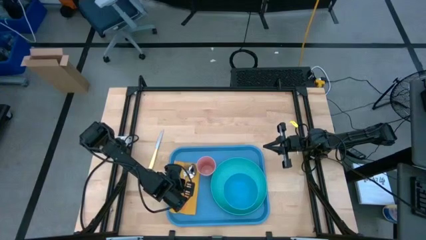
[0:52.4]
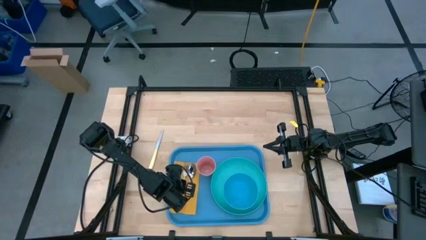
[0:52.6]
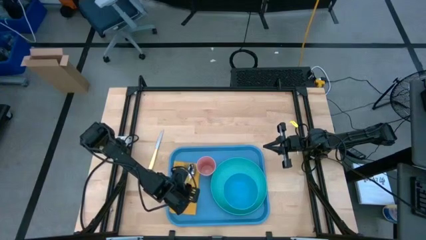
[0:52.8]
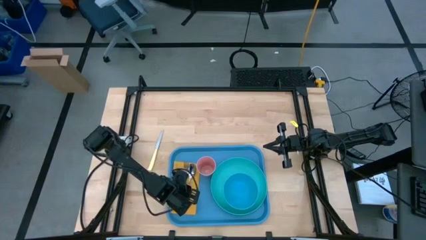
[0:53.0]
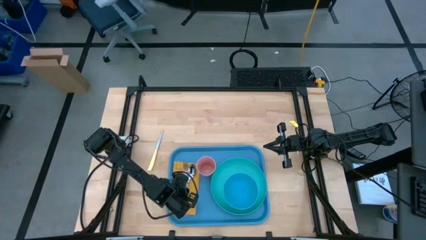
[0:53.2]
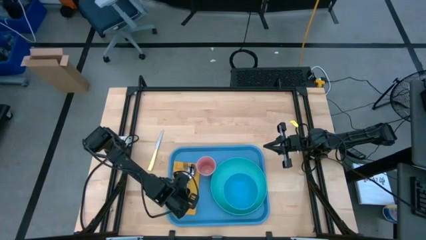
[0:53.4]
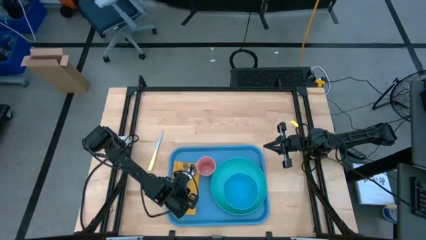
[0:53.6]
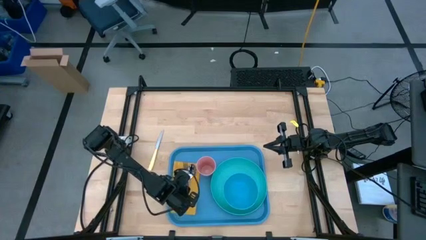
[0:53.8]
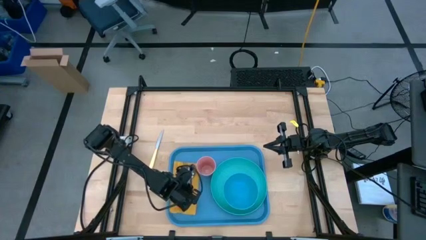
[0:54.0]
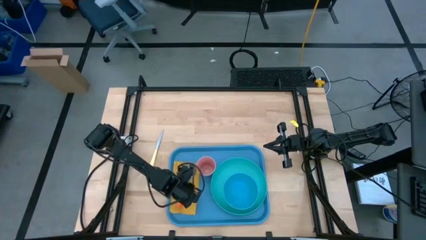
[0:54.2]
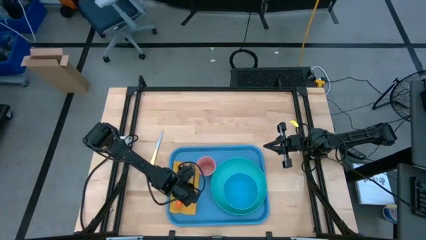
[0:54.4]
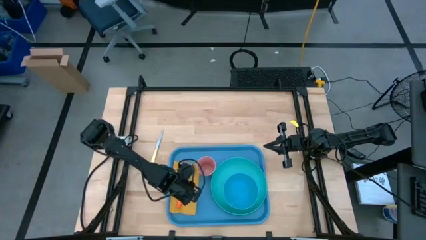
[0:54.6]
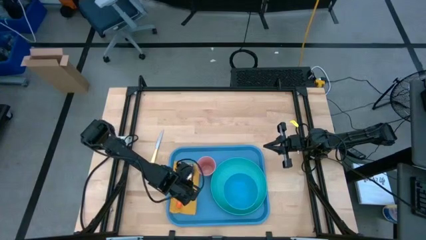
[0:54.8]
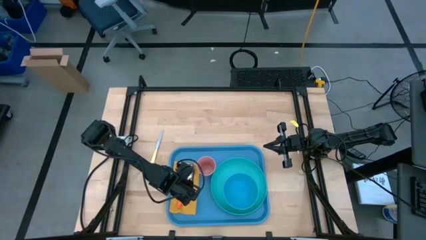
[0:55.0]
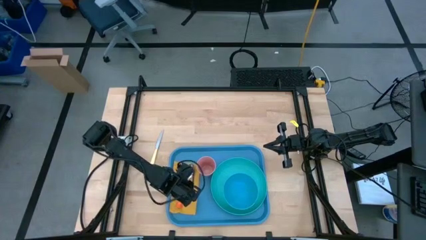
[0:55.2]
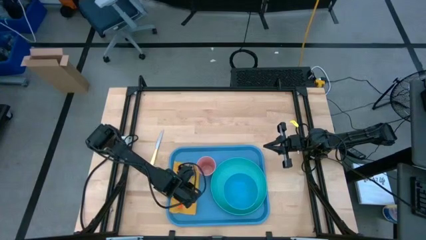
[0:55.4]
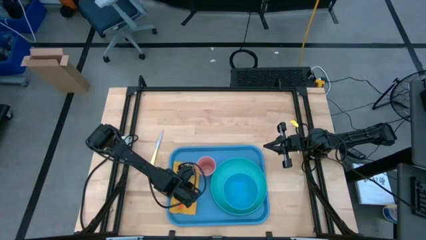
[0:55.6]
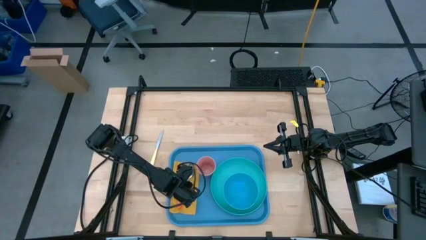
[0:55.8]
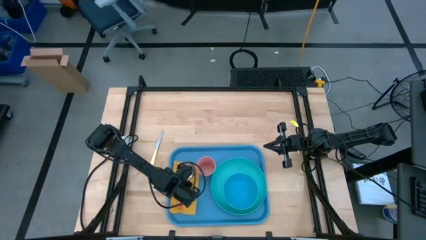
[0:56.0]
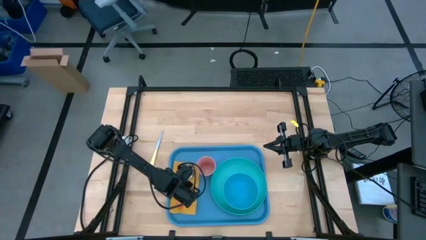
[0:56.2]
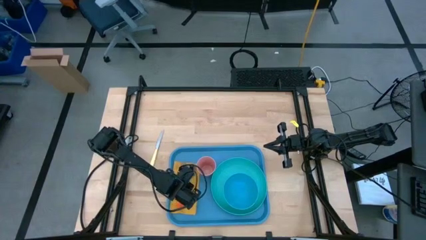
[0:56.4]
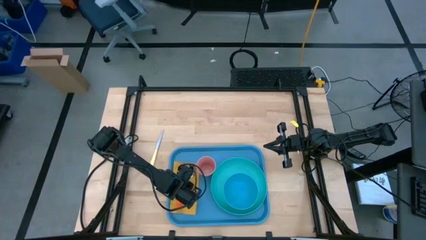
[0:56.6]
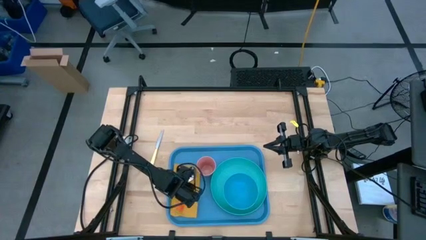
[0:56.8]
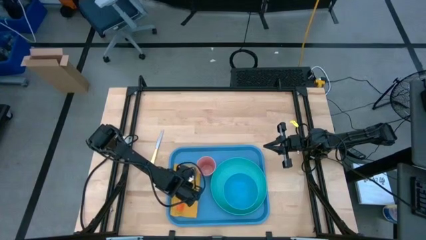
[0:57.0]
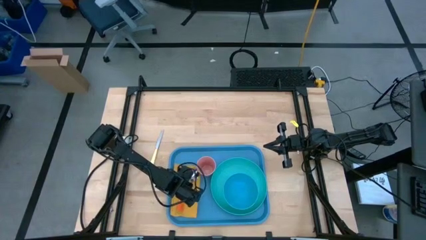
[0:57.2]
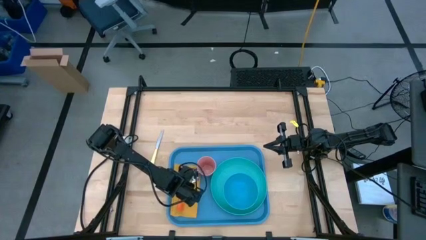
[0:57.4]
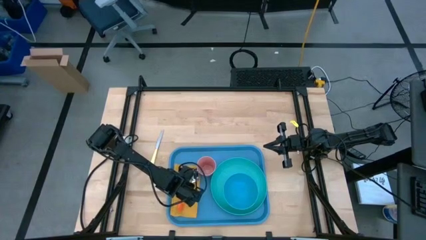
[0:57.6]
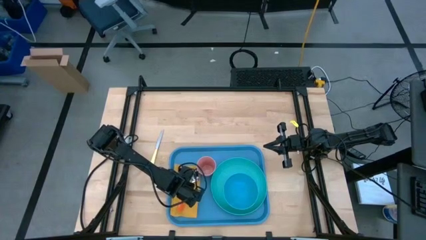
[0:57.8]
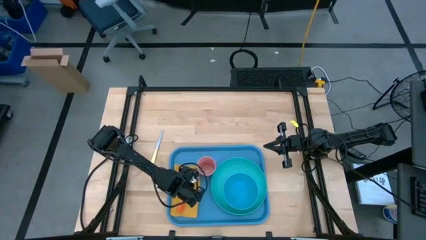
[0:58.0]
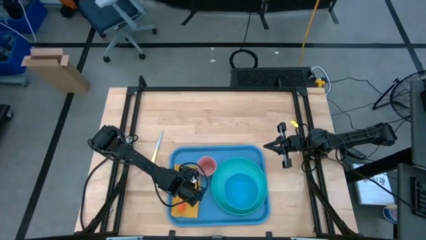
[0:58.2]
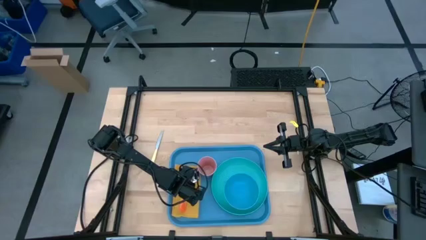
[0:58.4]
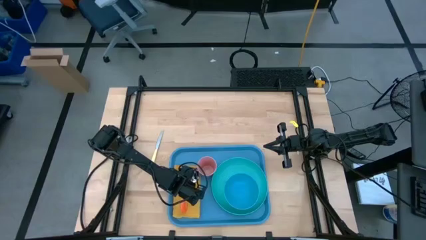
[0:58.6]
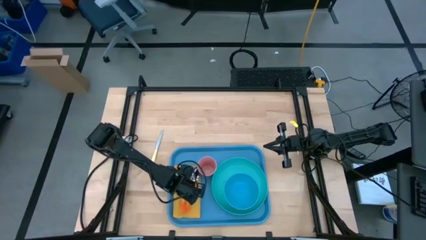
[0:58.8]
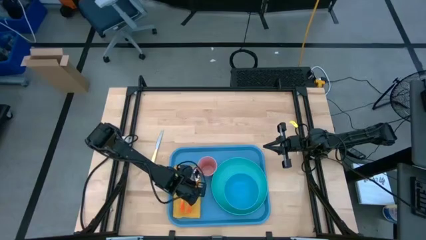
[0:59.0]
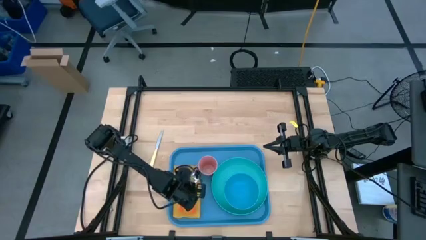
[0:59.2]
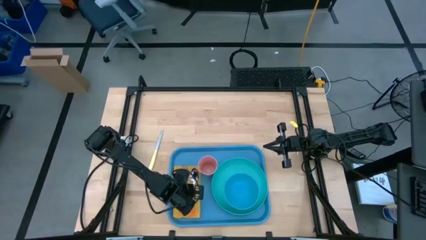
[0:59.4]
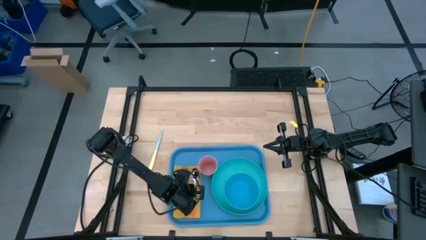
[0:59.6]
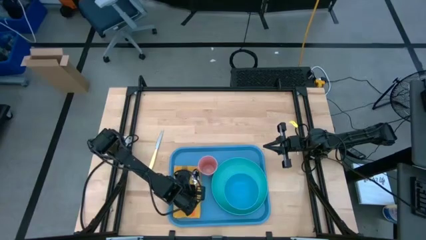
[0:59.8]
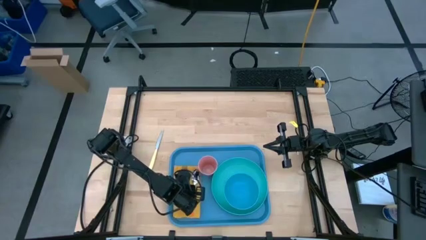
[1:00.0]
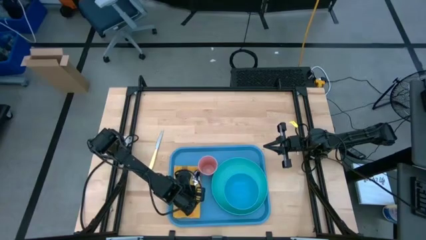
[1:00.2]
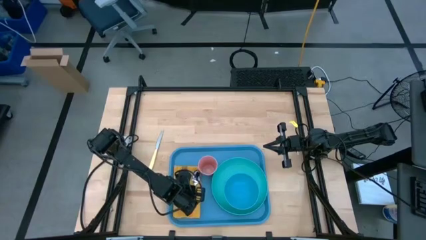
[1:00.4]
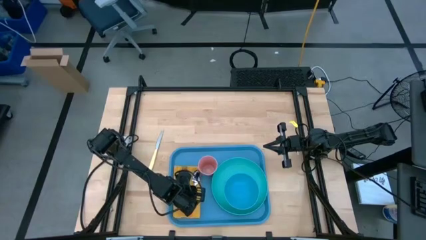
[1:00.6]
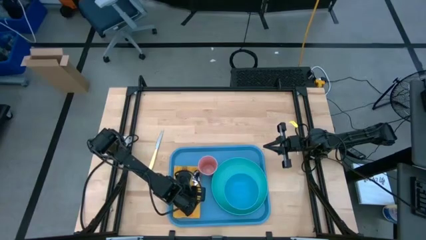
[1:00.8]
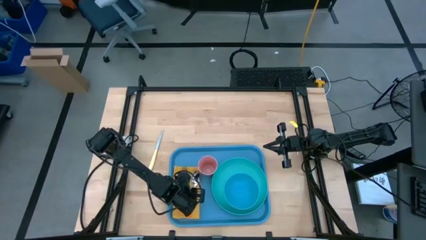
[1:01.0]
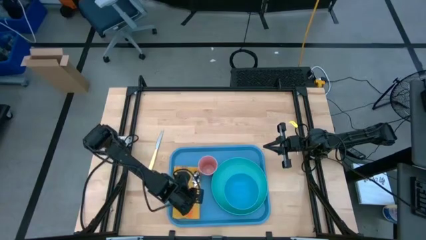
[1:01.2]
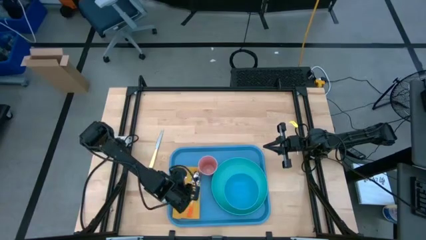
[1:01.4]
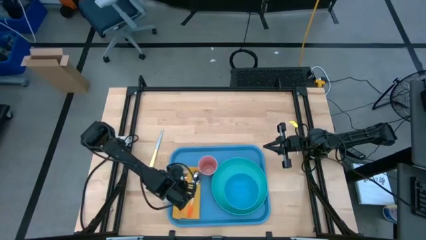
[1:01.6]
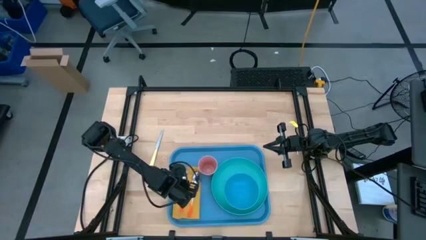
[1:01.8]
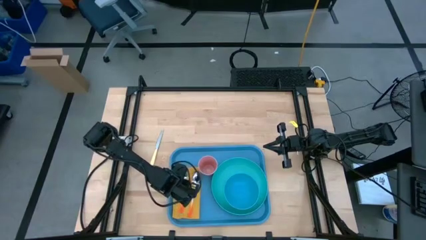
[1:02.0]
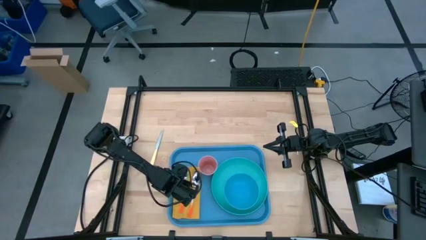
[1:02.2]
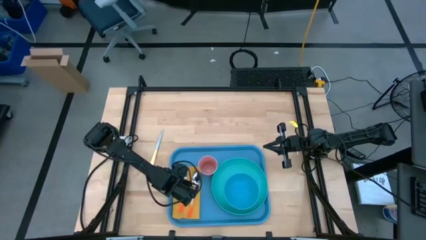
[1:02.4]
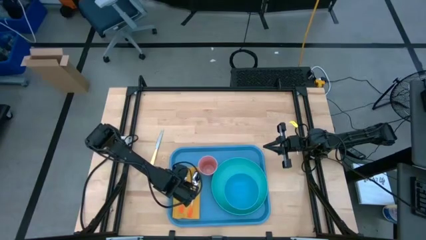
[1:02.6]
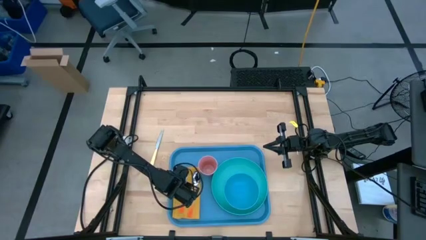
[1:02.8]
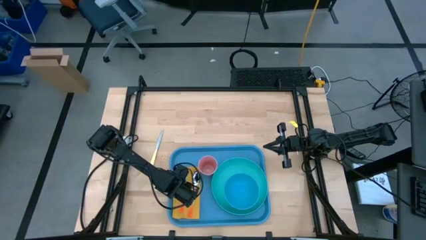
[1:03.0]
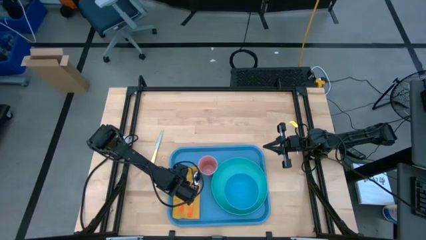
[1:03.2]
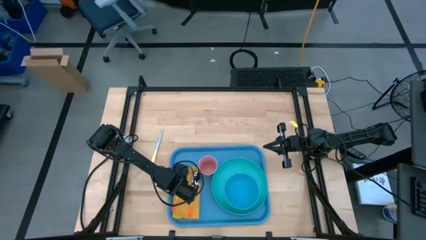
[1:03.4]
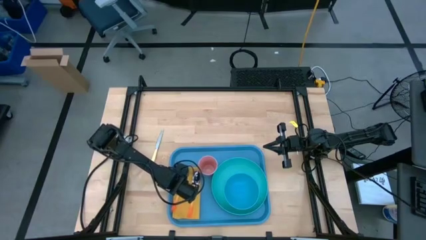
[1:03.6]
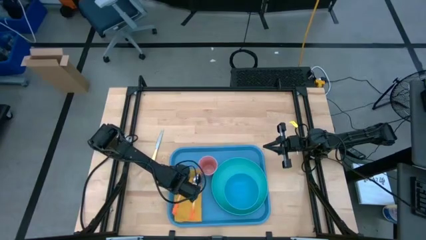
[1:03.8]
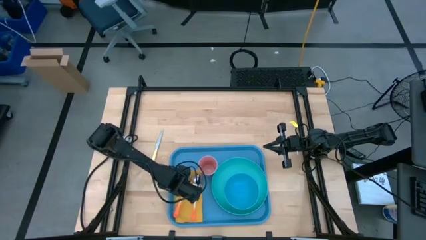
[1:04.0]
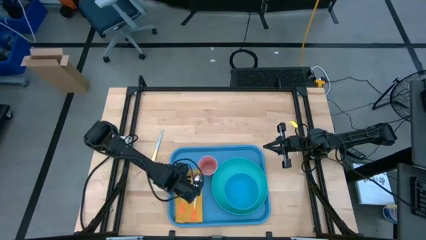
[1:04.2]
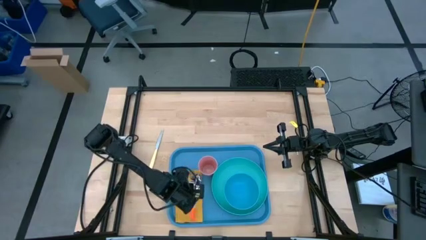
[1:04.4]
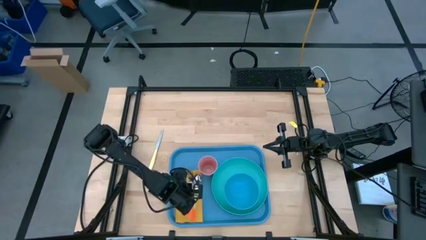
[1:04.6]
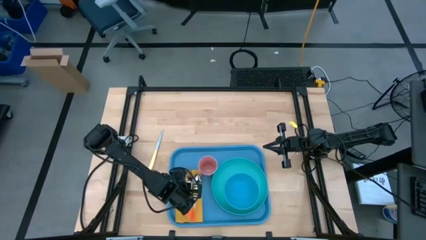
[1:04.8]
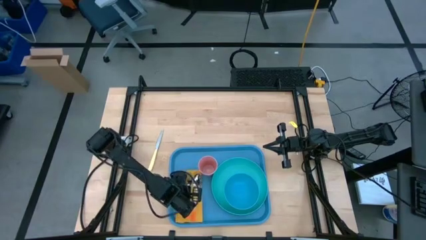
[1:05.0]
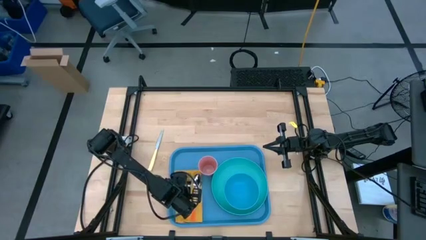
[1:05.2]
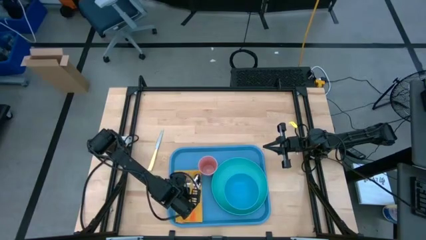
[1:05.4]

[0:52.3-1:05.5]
Task: Set up tray
Adjust the silverware
